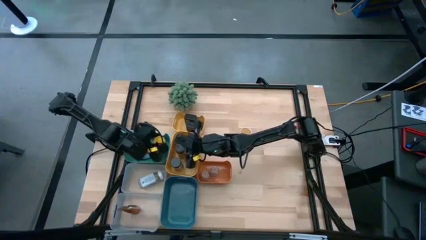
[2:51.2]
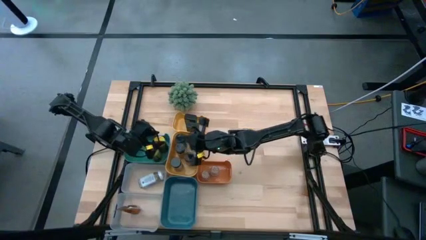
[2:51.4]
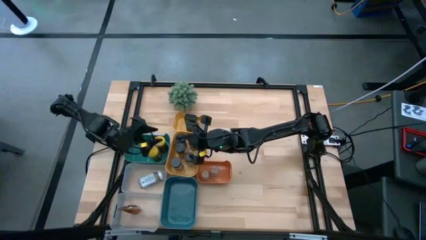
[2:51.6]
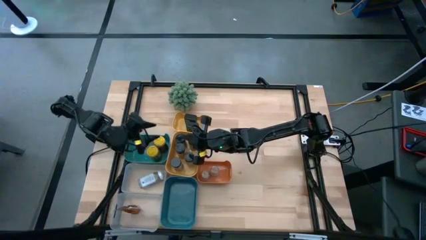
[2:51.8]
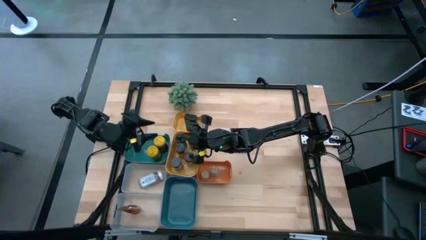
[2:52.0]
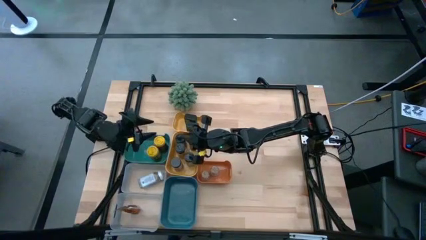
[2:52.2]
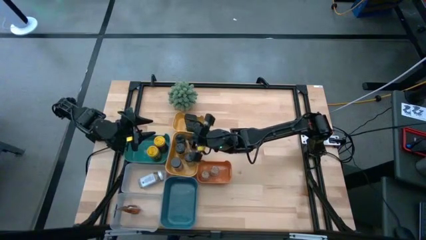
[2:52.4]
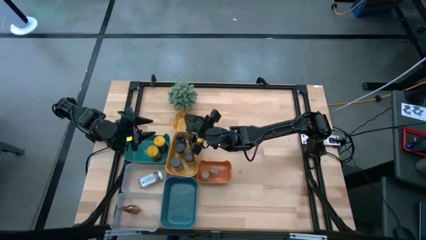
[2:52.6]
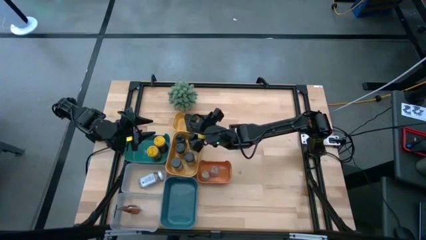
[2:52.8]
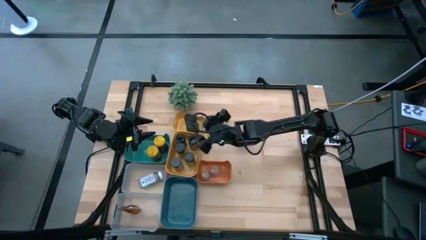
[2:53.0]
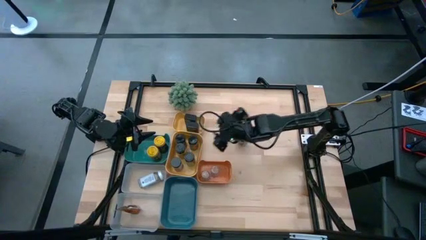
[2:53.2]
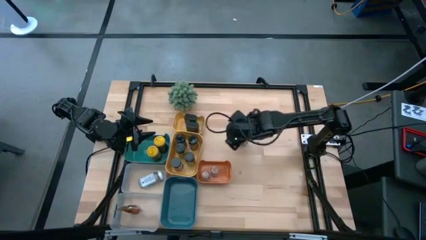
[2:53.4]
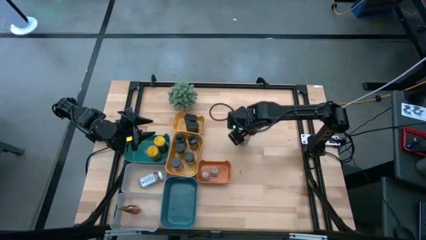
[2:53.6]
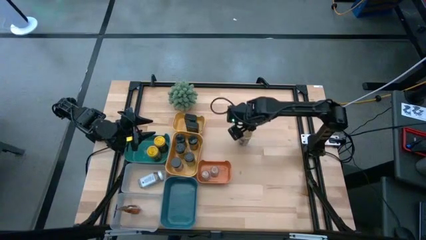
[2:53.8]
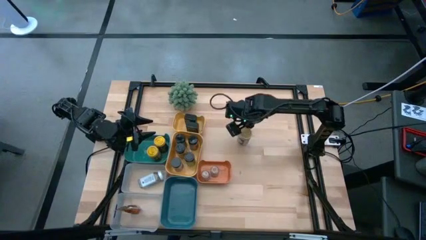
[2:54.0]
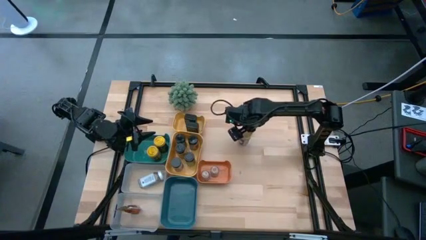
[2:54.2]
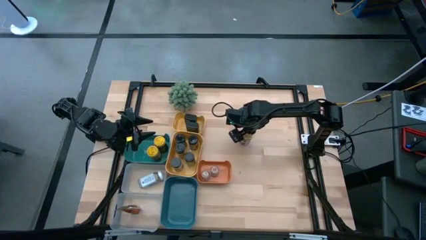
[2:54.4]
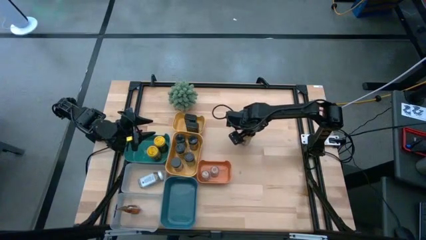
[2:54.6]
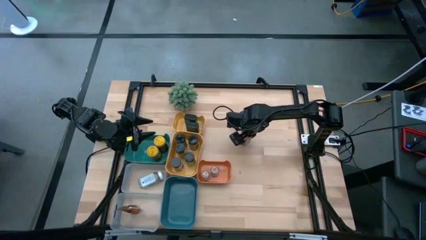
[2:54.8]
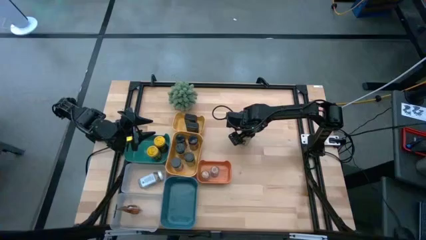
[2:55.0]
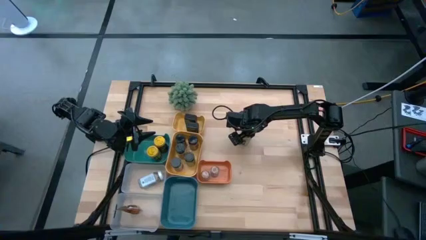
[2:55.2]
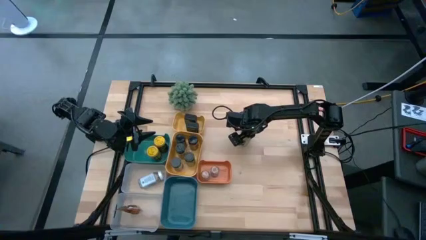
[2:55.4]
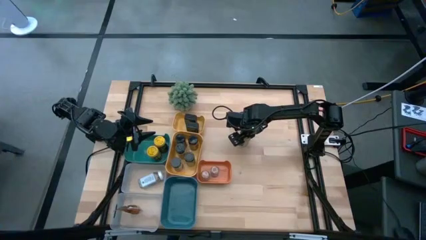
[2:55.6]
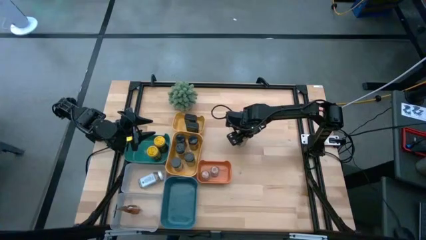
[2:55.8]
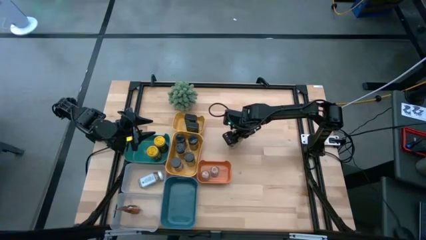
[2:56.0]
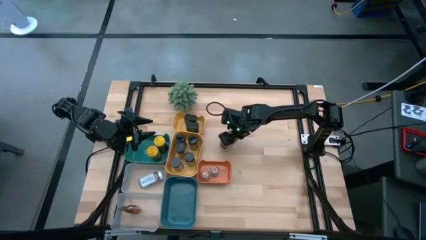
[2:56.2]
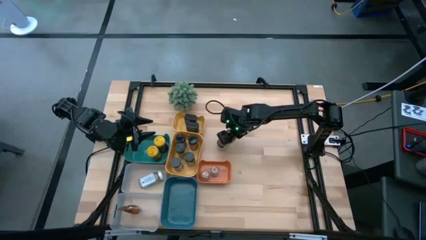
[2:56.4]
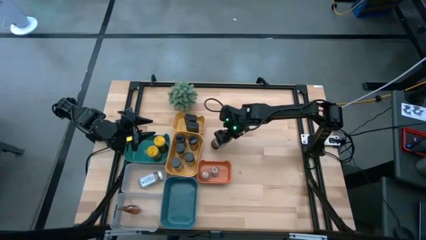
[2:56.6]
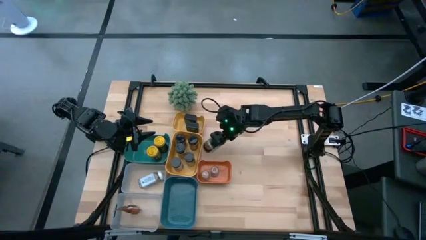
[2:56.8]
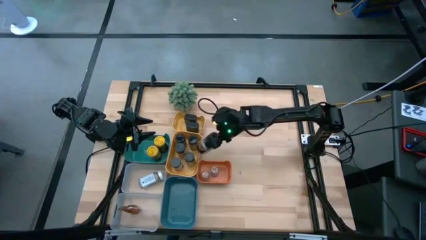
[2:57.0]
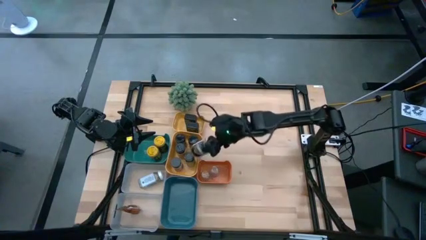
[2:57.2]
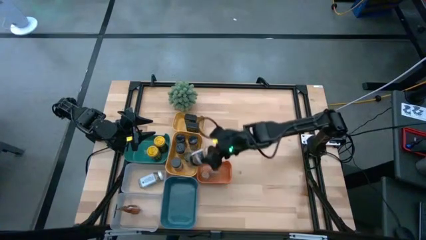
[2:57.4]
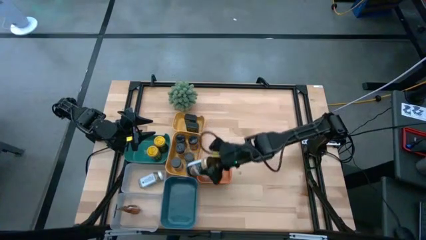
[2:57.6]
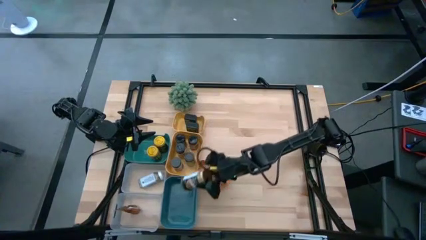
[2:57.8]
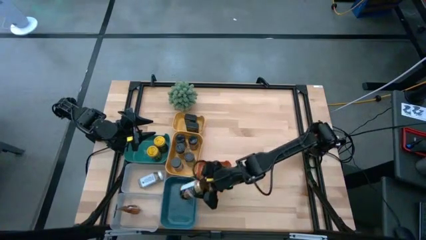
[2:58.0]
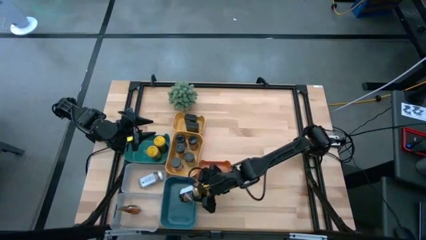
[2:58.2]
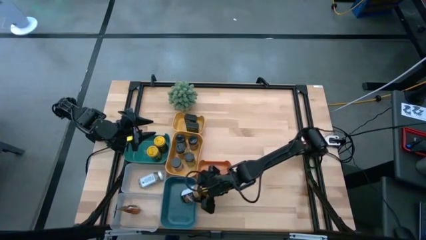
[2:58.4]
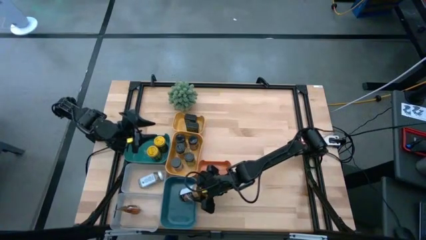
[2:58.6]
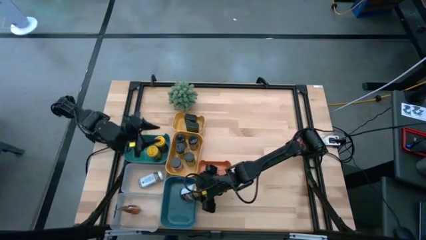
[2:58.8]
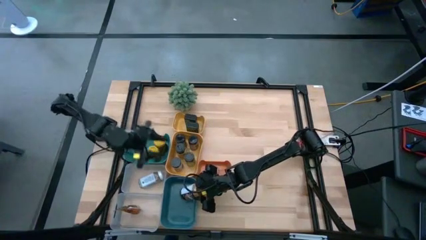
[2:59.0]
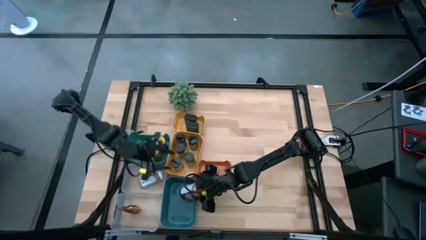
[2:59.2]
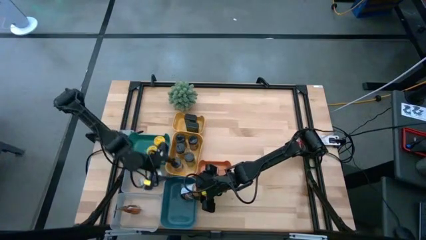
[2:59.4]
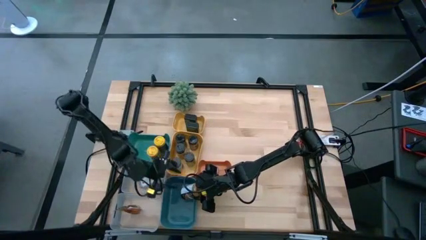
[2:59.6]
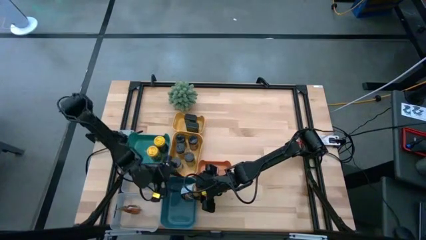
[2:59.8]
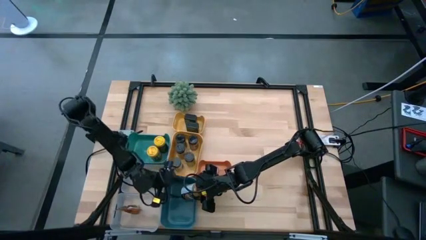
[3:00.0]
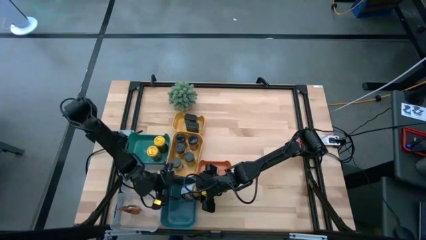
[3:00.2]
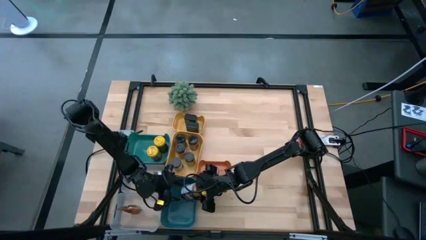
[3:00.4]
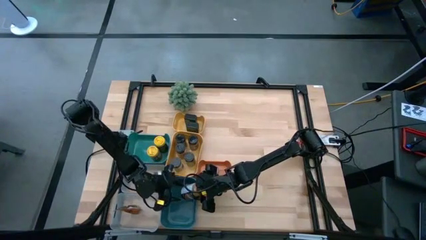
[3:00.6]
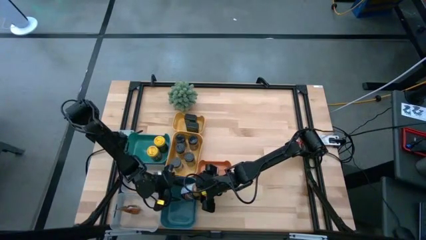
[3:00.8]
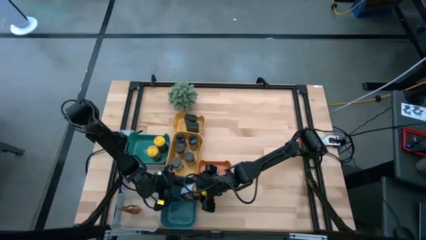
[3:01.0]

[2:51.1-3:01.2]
Task: Sort spices by type
Put the gold seasoning bottle into the blue bin
